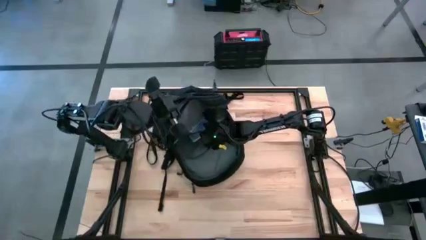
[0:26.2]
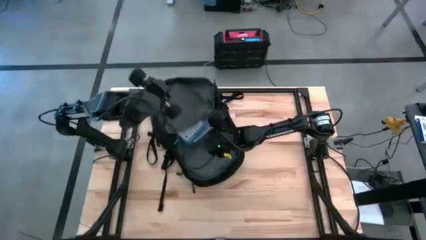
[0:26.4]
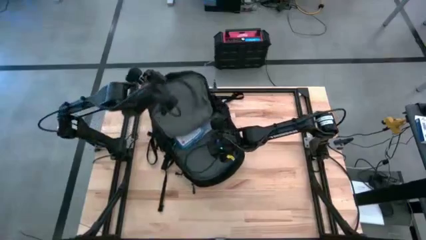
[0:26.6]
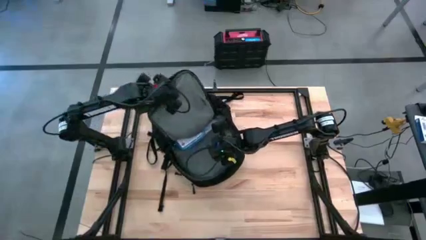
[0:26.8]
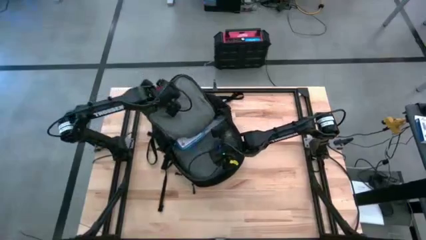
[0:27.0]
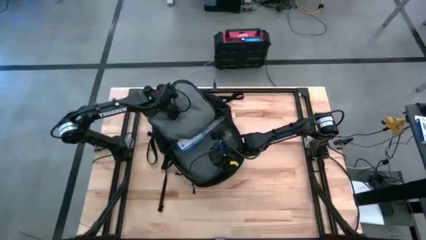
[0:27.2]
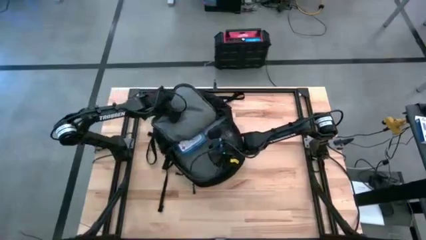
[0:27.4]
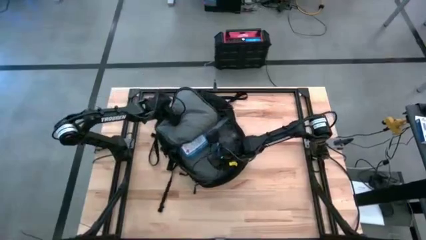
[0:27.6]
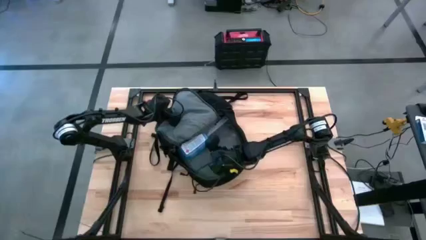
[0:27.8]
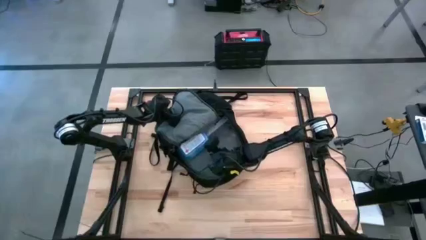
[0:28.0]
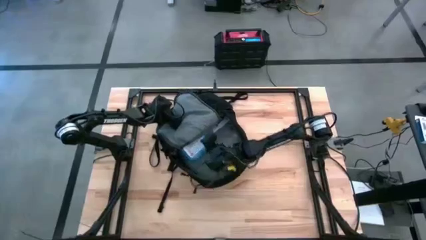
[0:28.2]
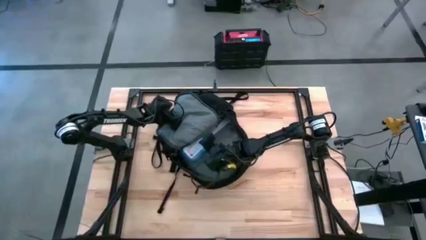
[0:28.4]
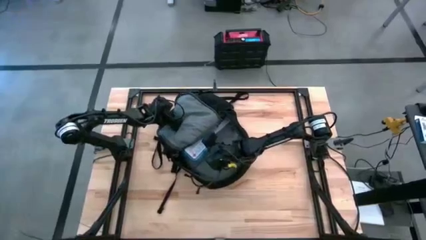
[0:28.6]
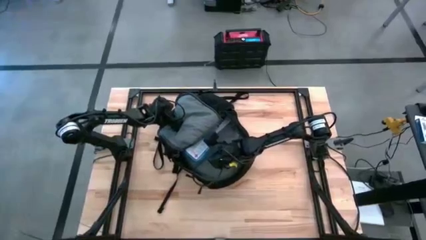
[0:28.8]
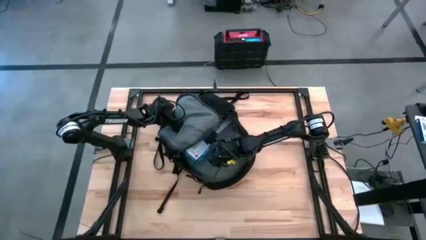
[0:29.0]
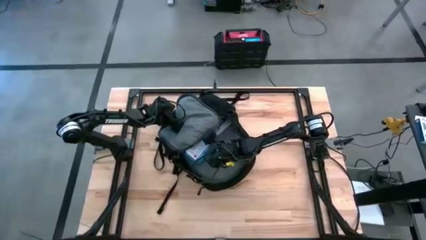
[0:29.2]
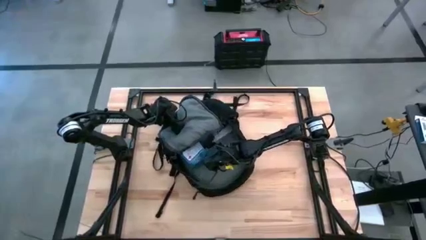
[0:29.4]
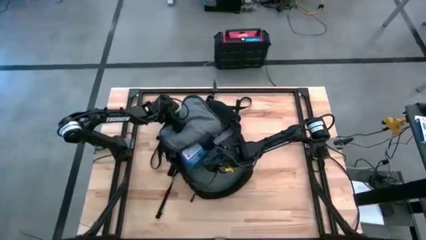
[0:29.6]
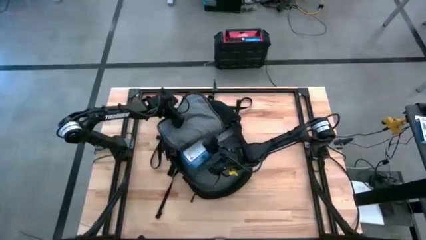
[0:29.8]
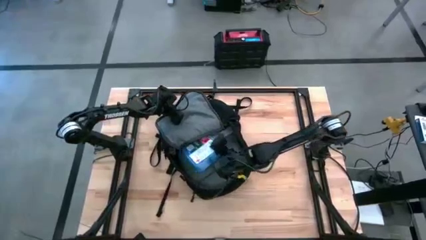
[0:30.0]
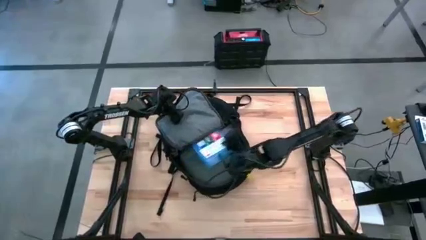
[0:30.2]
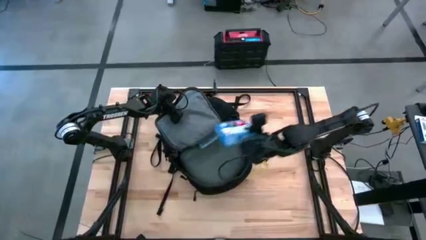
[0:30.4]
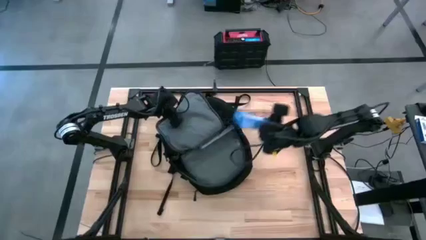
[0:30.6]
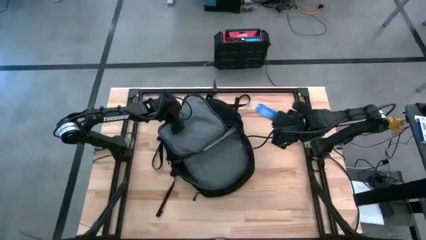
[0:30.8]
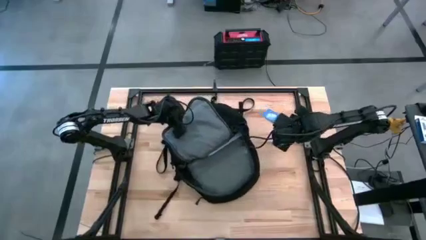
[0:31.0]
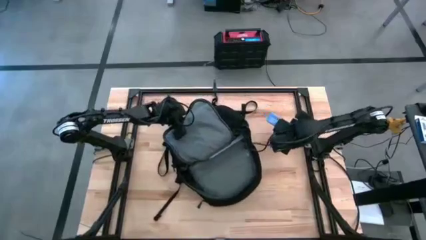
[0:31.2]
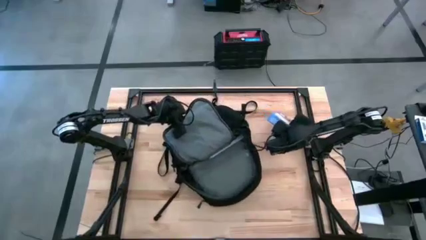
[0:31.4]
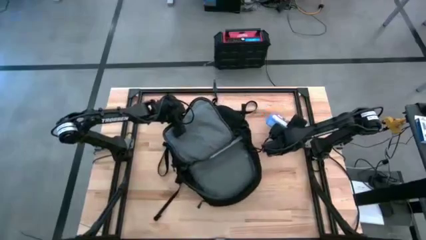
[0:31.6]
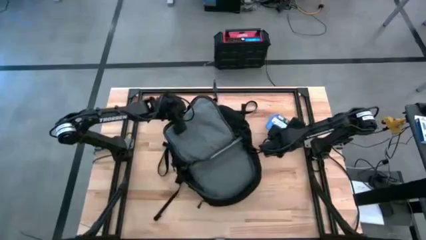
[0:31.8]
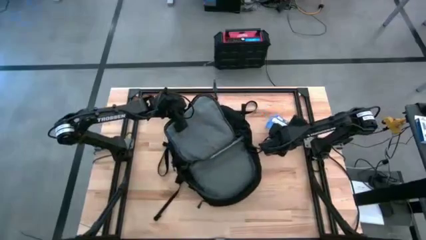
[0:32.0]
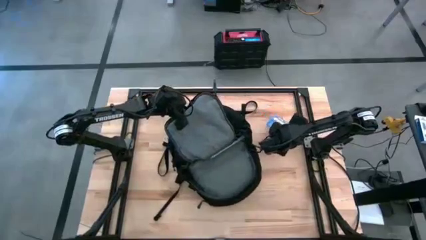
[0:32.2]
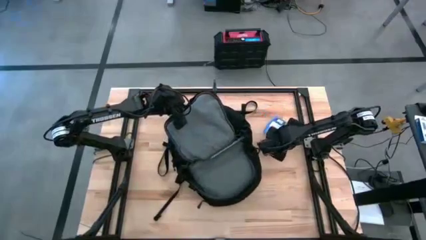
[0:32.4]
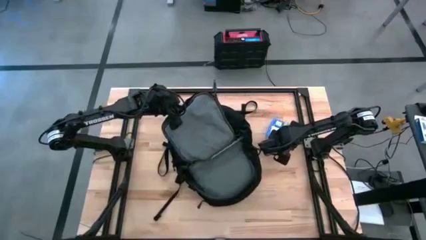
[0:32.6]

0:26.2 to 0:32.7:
Task: Unpack backpack
Remove the blue first aid kit from the black backpack

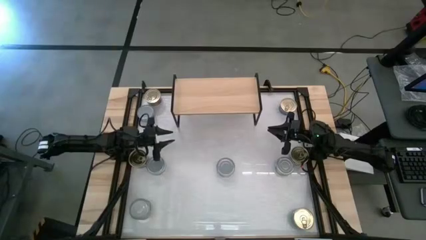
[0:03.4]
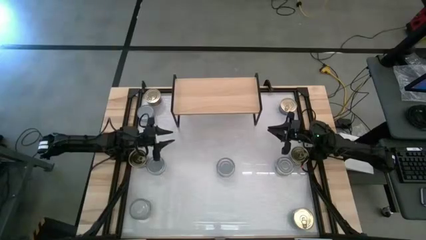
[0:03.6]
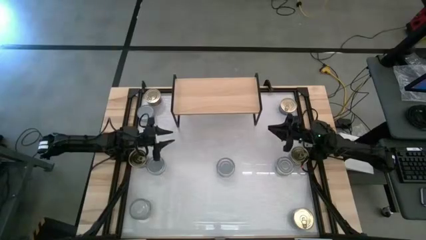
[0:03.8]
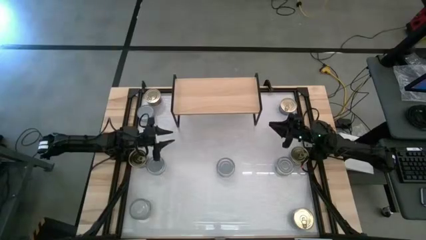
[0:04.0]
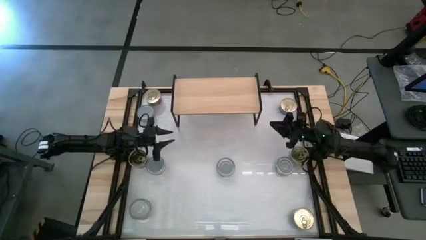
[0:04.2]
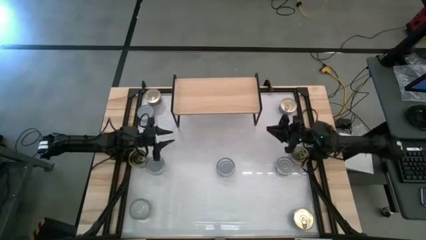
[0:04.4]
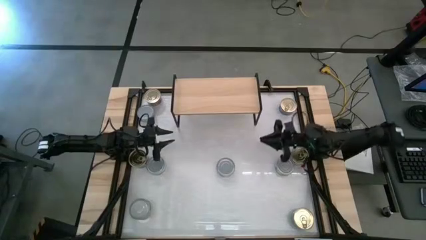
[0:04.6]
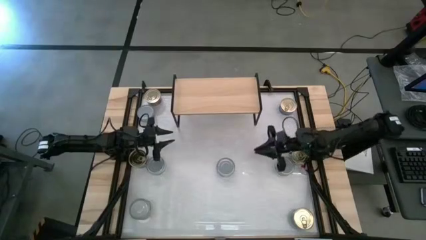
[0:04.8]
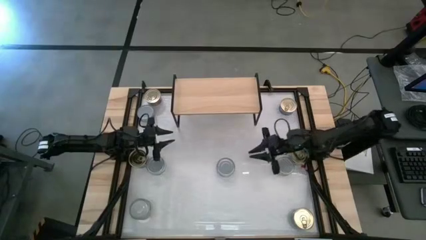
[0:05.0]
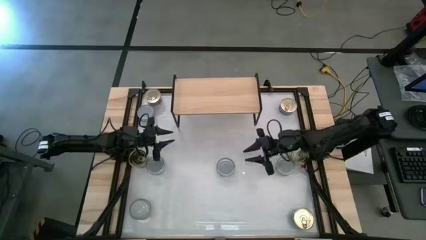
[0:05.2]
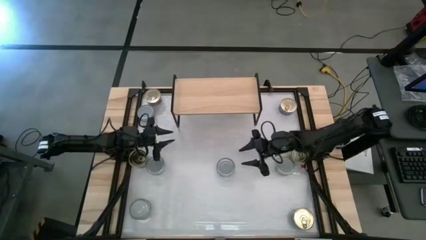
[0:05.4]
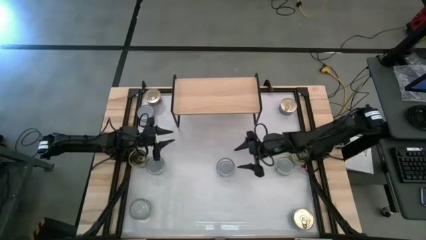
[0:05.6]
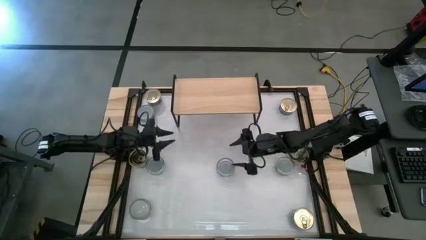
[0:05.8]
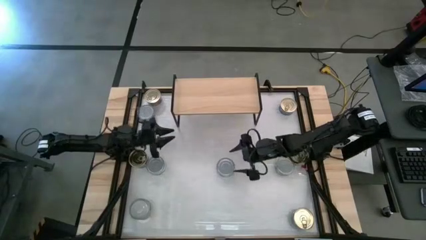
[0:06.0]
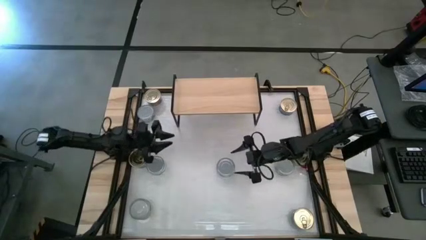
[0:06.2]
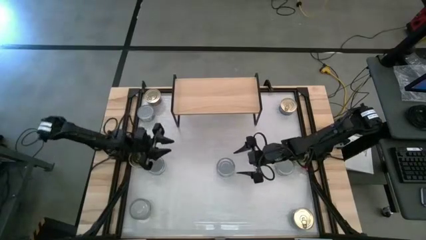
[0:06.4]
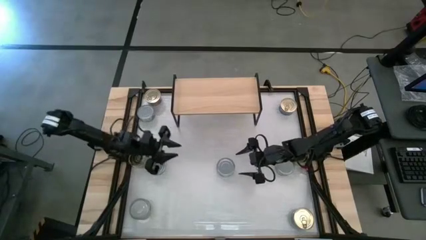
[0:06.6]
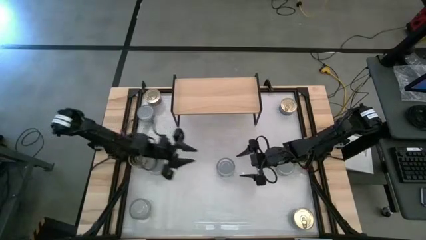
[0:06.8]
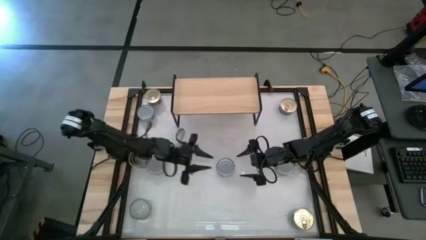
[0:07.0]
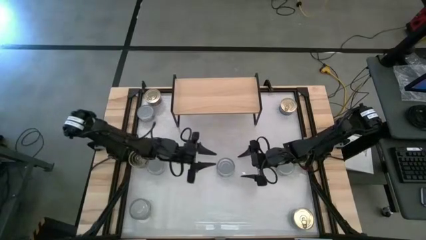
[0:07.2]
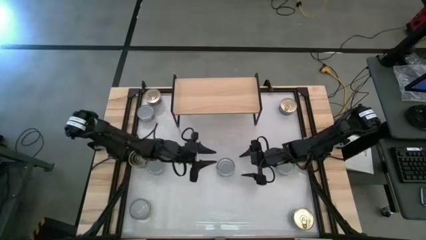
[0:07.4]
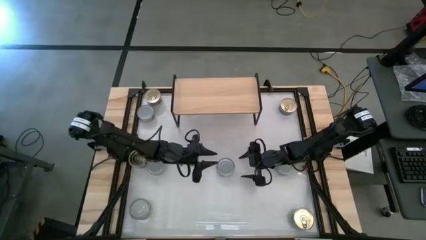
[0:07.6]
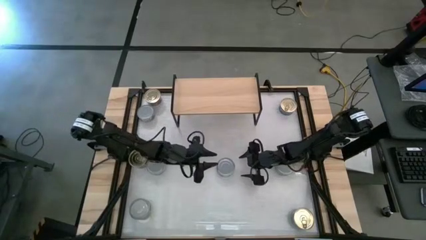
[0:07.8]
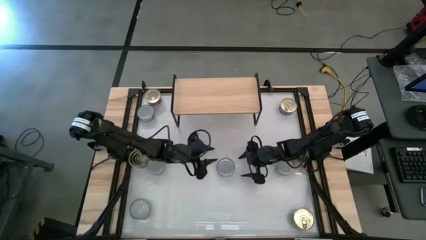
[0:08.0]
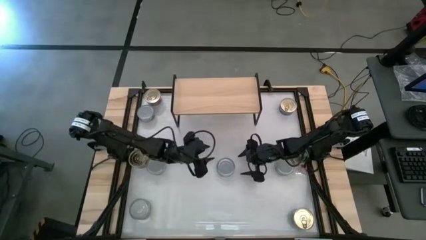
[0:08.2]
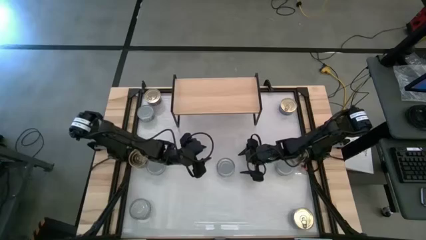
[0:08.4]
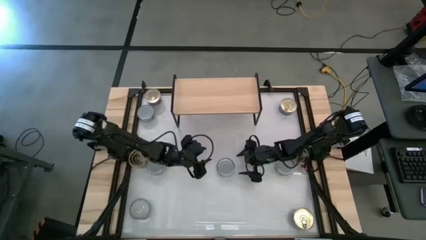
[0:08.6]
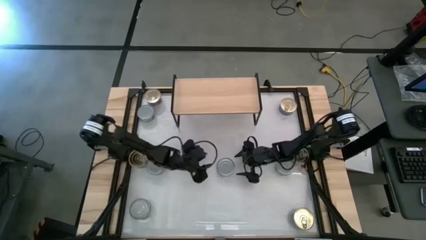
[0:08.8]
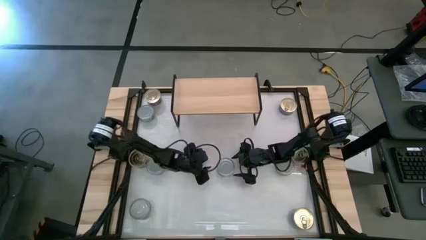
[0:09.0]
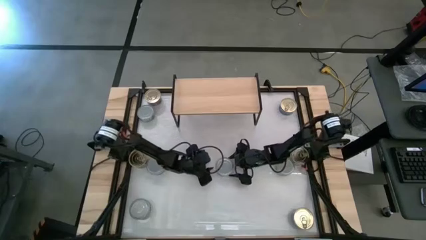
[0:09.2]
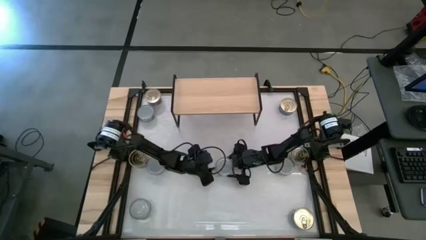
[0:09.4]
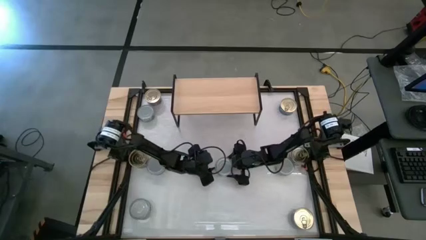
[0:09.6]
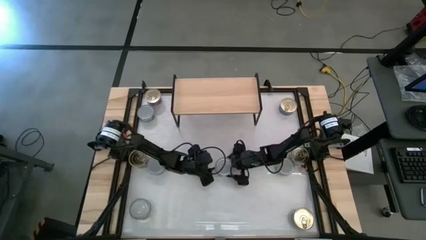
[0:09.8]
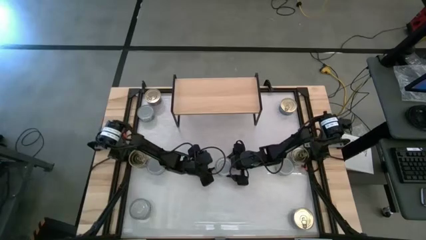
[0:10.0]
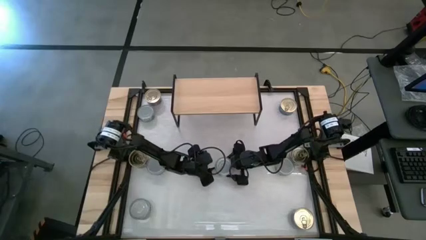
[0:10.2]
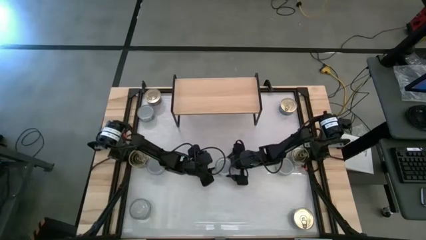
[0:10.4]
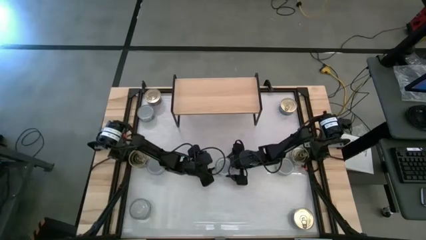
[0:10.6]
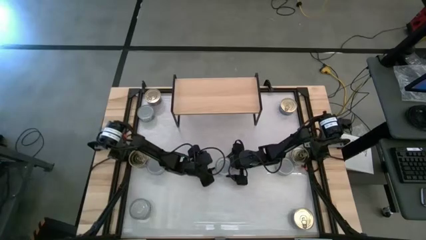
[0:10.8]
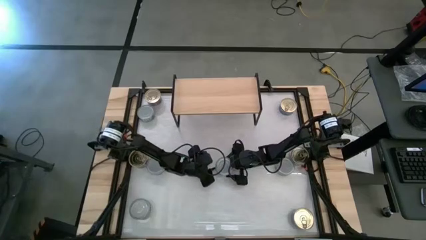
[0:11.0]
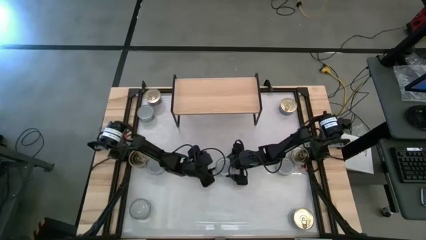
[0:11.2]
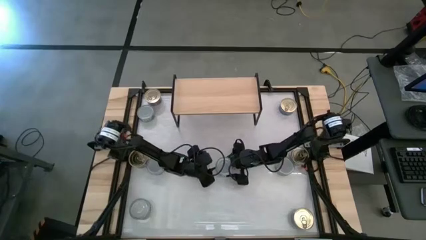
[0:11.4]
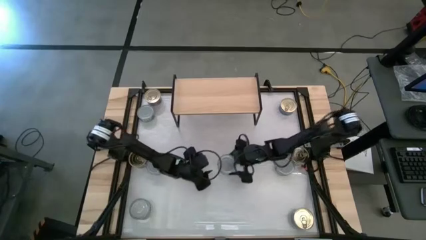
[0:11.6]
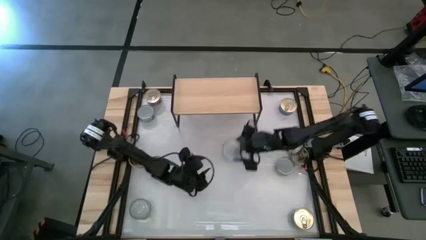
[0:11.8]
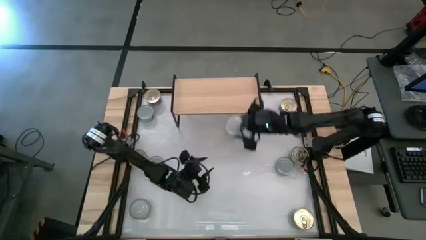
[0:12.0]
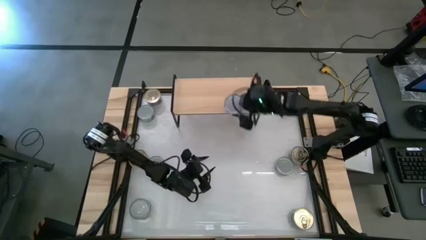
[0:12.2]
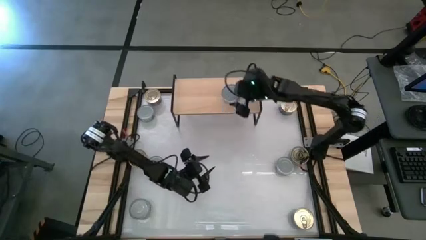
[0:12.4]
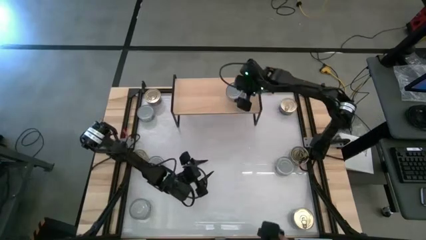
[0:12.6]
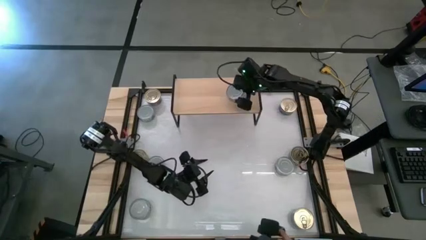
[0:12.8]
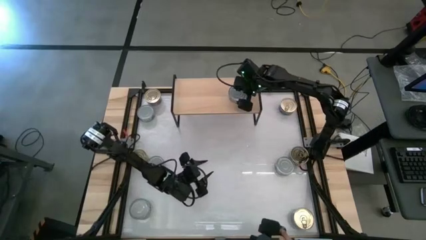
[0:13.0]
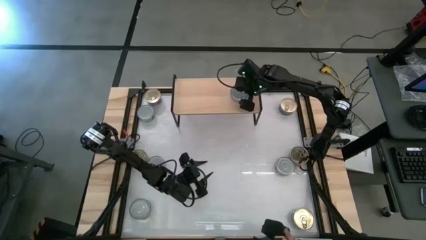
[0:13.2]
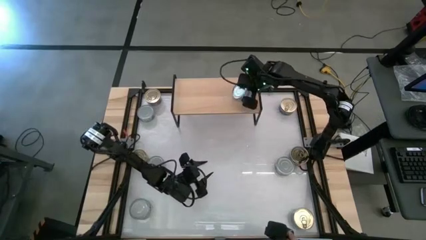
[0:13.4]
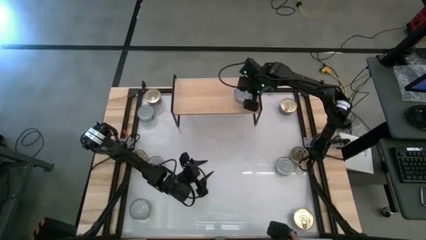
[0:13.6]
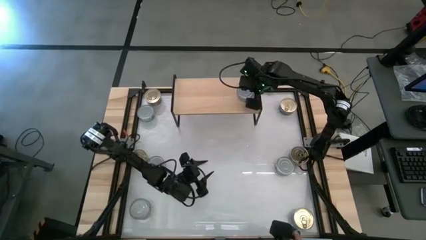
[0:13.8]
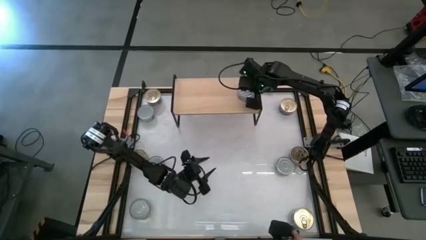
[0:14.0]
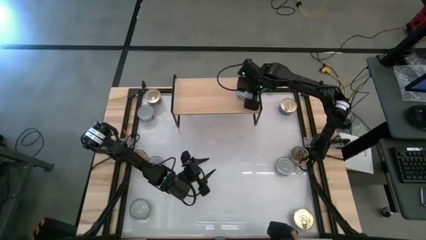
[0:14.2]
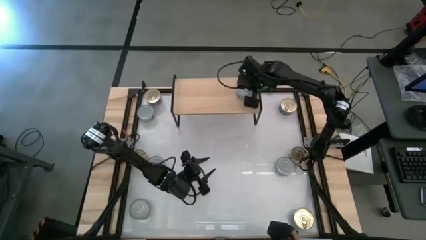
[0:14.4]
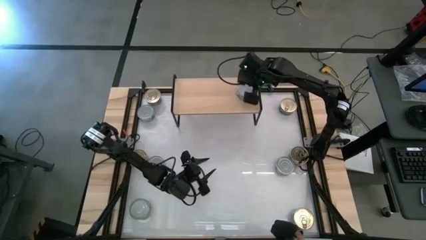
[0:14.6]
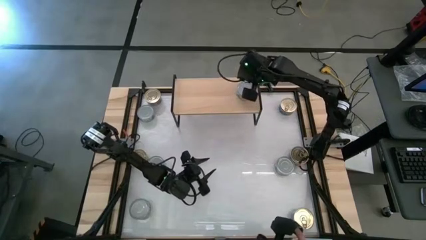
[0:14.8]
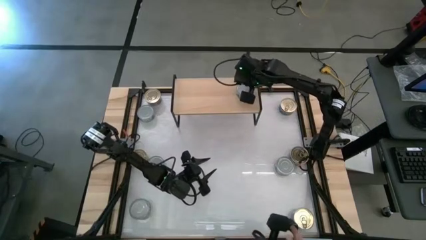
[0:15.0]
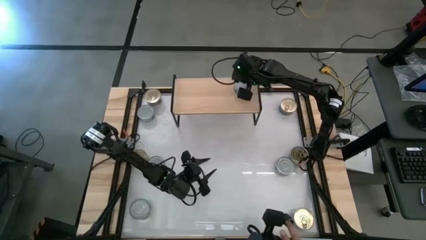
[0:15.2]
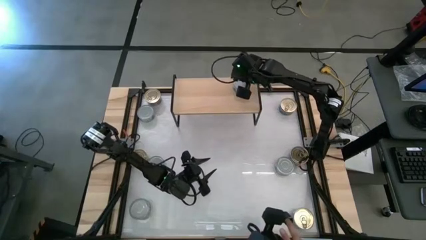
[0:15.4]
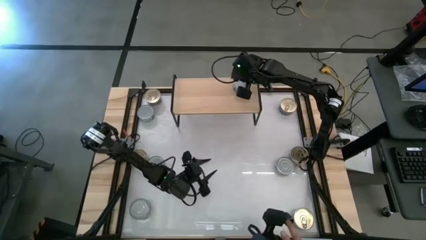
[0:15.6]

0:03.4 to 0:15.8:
Task: Stack canned seafood by type on shelf
Put the center green tuna can on the shelf
